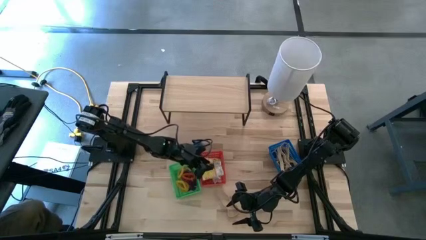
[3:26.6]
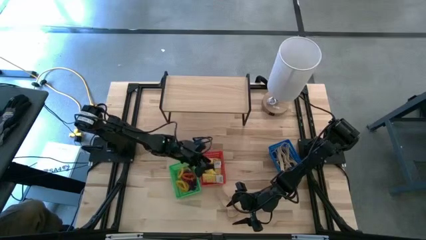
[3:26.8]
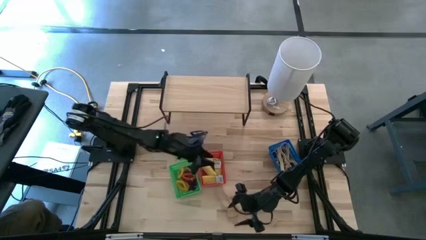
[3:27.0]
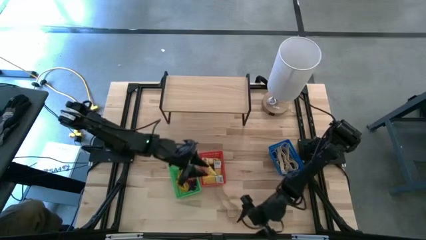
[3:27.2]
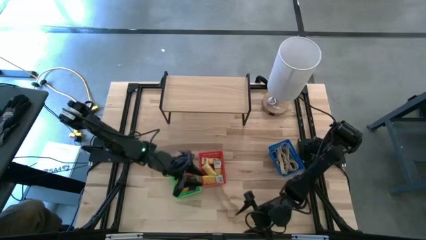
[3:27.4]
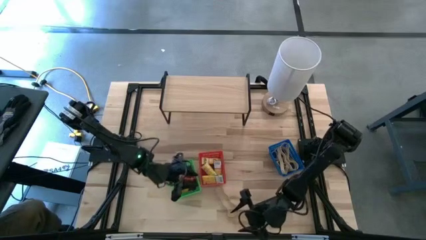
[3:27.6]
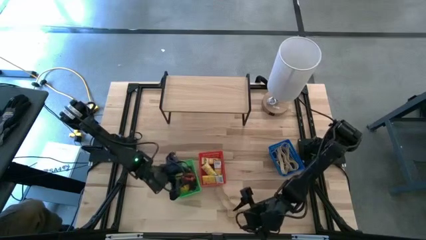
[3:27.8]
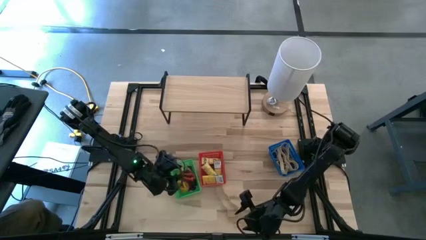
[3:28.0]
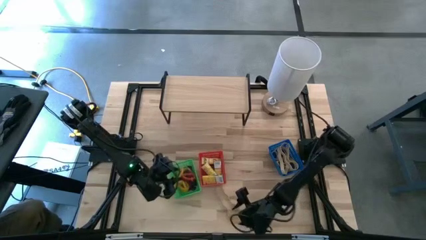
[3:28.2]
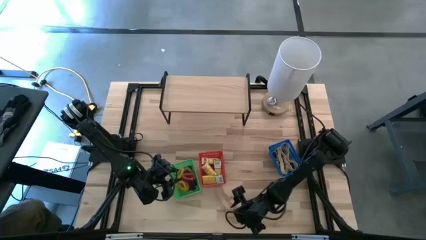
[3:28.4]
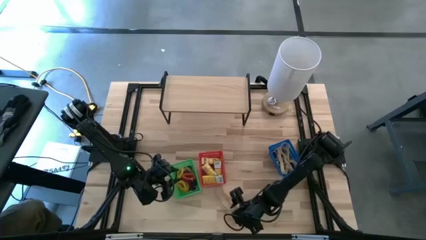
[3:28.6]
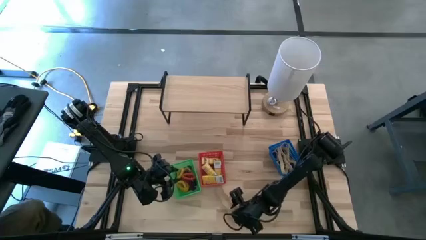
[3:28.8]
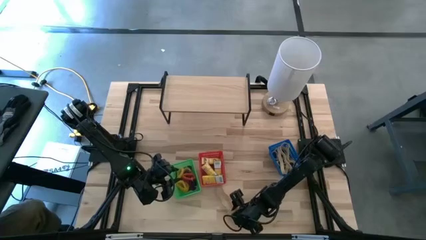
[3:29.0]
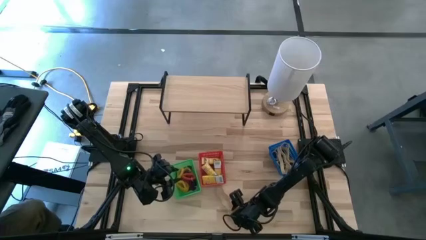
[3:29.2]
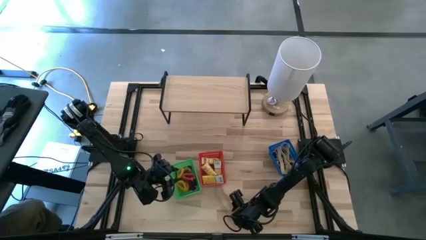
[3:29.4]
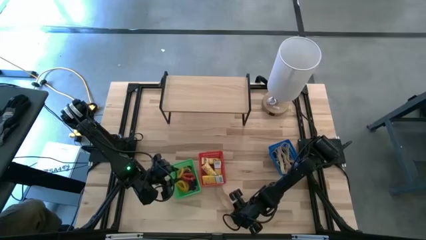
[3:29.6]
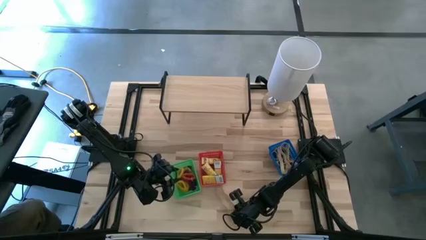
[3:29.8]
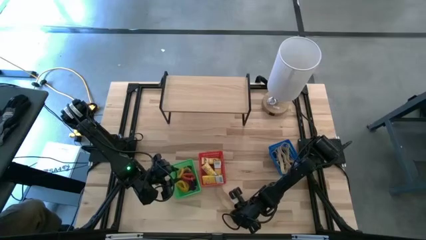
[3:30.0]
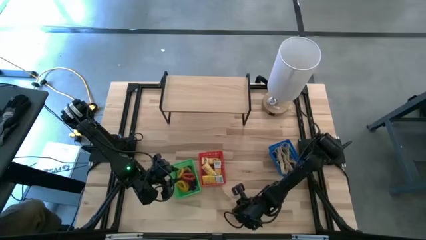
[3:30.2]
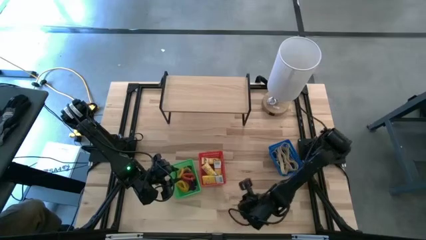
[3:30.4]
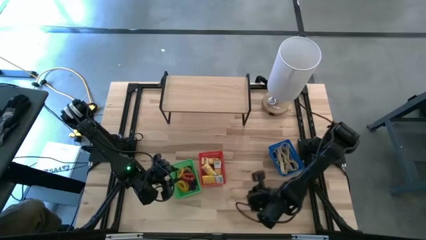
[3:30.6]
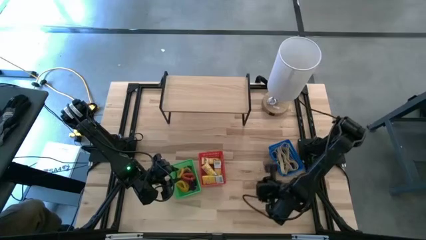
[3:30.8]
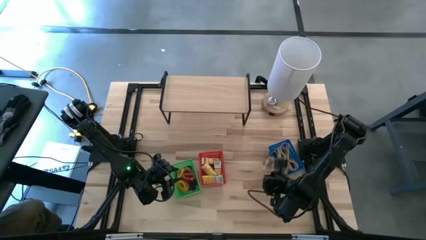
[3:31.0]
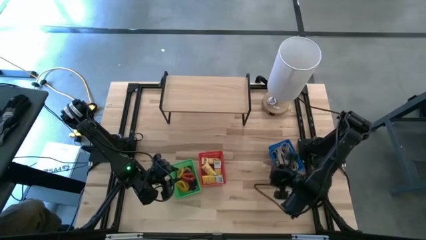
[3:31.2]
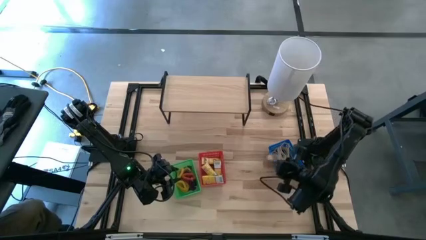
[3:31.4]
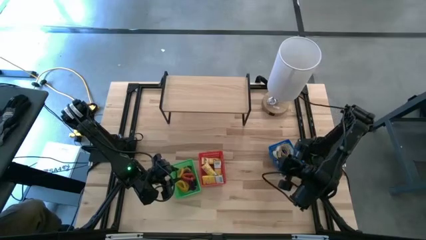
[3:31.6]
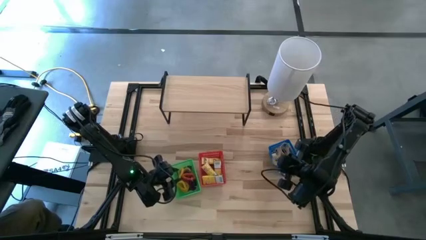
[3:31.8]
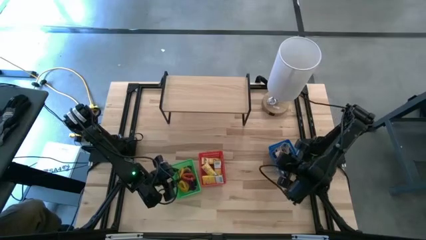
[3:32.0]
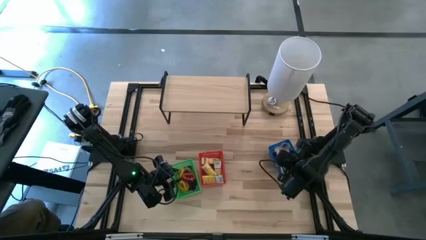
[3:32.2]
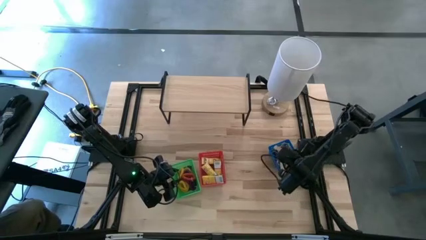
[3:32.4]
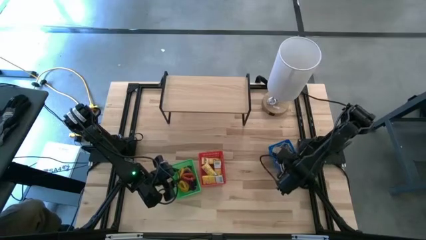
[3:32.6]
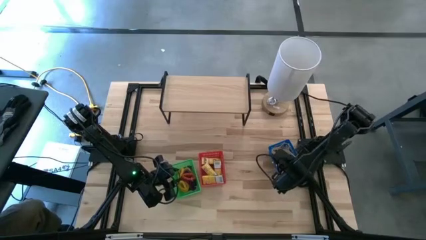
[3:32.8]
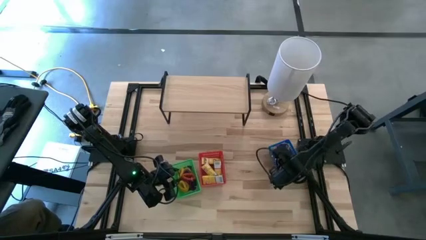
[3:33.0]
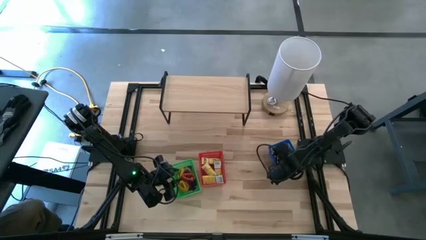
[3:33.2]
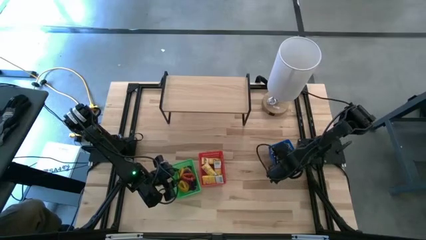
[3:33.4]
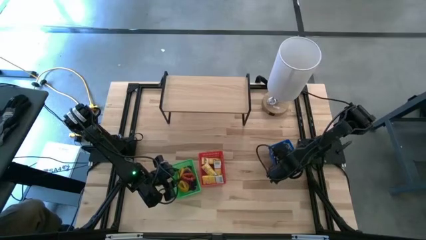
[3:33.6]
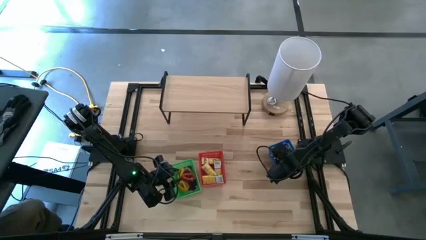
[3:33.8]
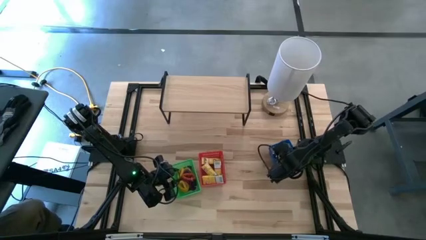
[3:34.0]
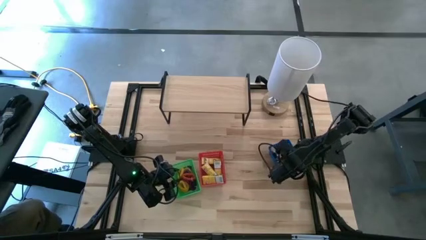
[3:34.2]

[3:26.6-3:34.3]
Task: Pick & Place Office Desk Supplies
Put the white rubber band into the blue bin

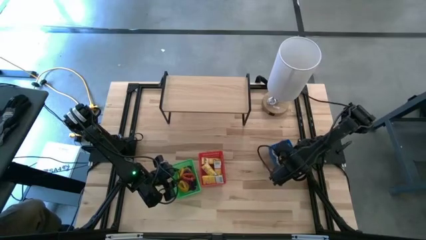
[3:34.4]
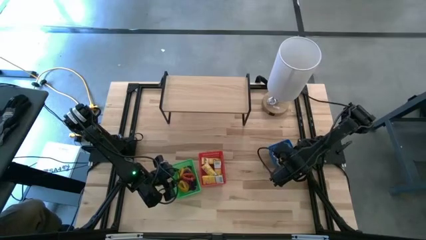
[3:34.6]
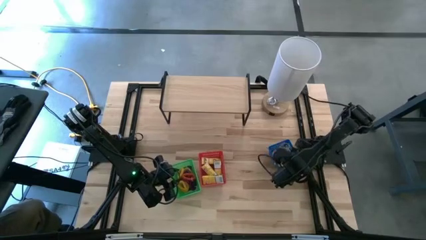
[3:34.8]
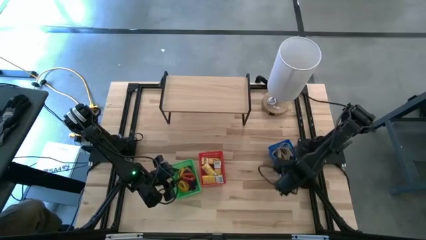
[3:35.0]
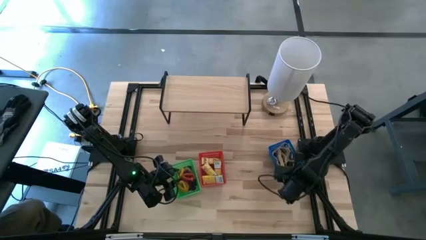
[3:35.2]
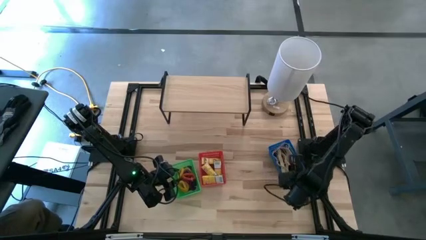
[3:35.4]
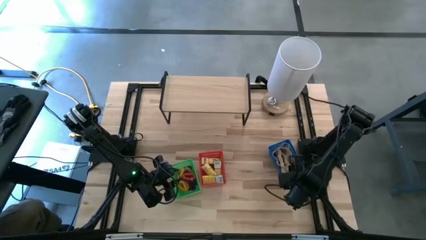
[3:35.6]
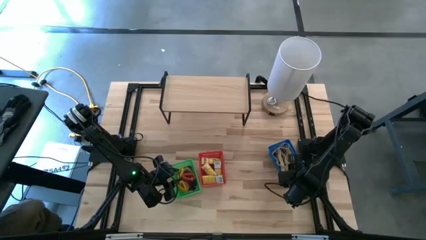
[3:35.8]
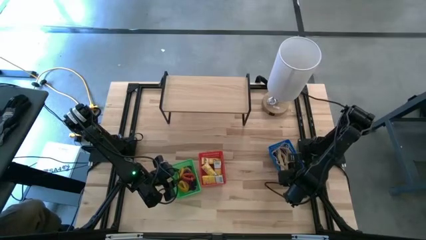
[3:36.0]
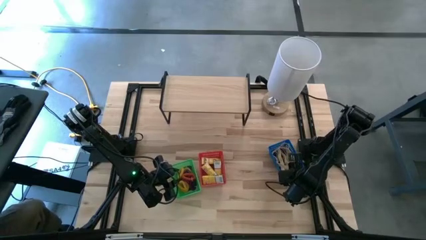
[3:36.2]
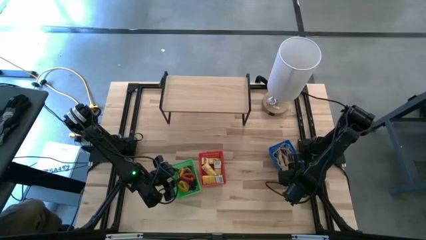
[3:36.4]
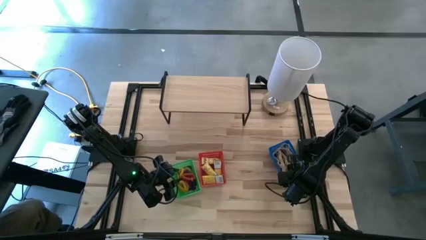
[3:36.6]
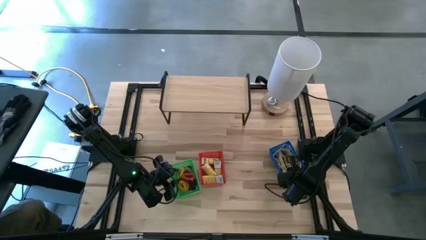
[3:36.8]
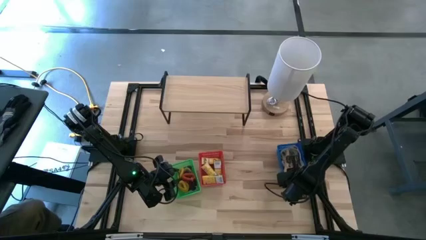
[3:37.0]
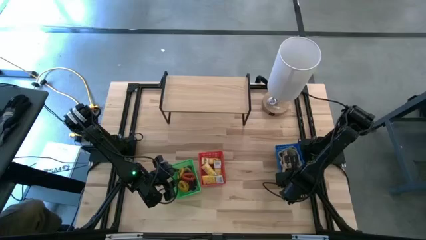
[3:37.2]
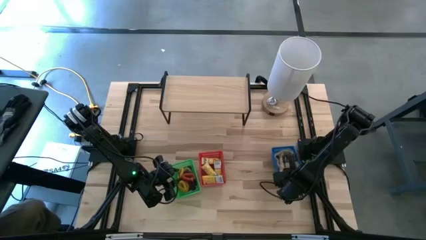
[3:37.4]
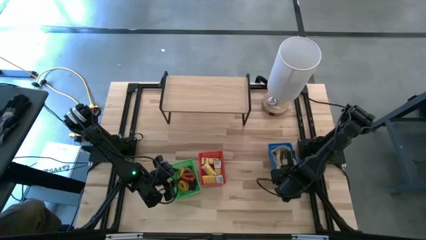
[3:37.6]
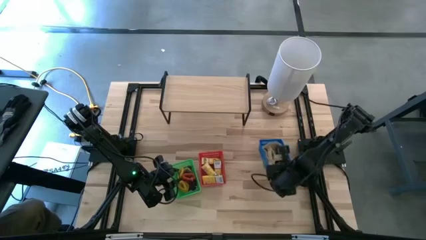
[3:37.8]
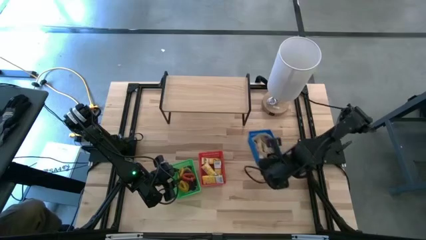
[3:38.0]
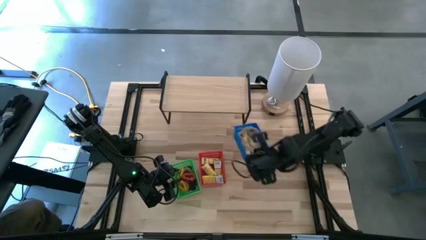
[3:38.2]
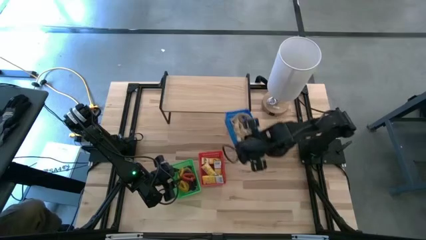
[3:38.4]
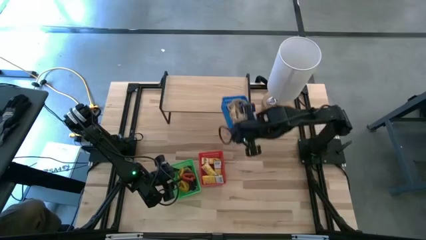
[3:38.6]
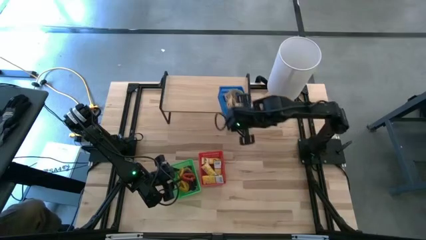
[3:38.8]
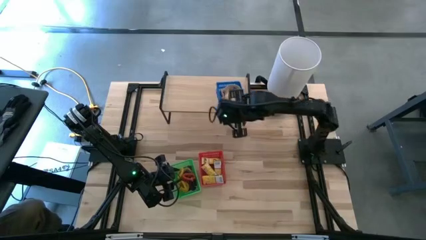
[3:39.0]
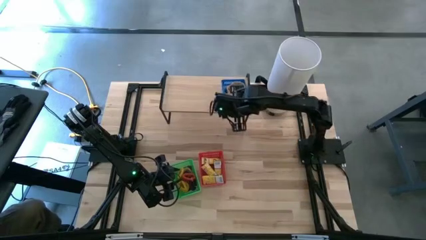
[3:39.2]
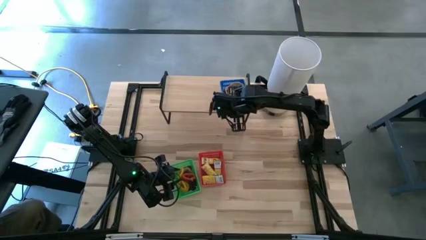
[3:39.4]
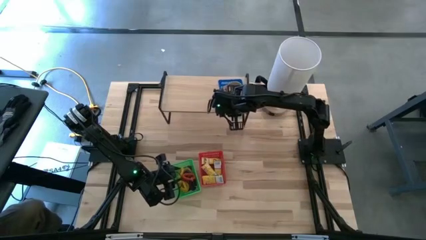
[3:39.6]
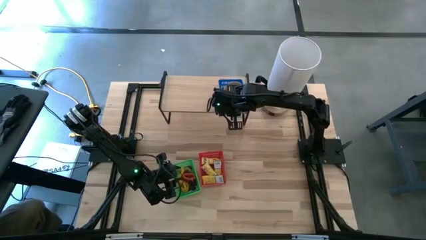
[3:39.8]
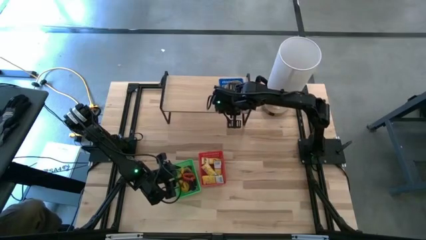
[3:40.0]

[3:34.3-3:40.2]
Put the blue bin on the shelf

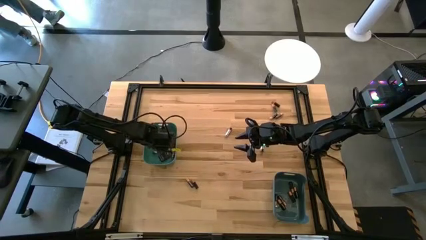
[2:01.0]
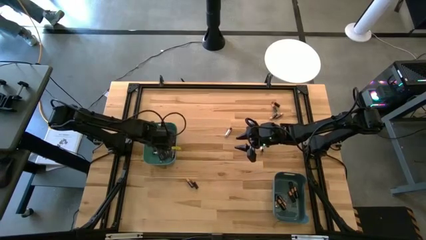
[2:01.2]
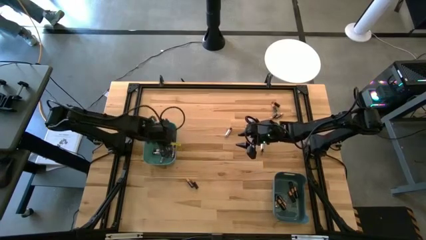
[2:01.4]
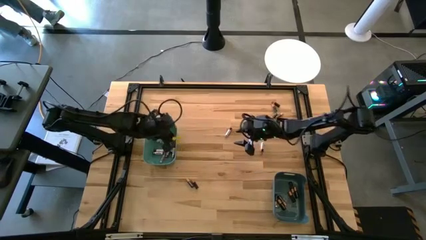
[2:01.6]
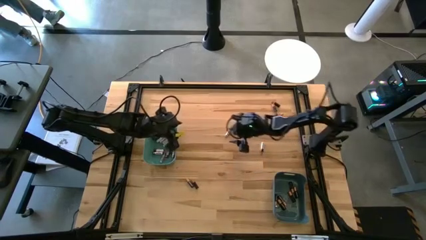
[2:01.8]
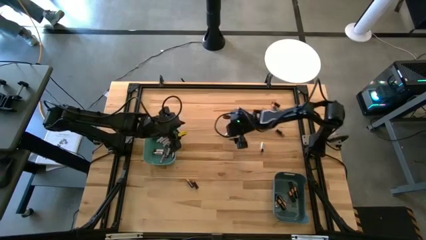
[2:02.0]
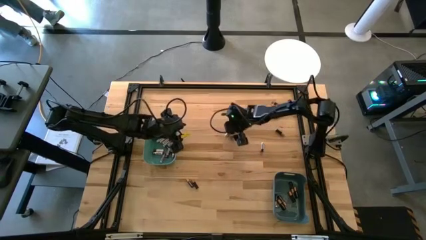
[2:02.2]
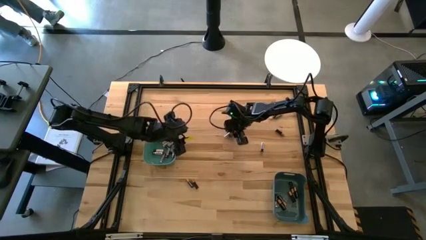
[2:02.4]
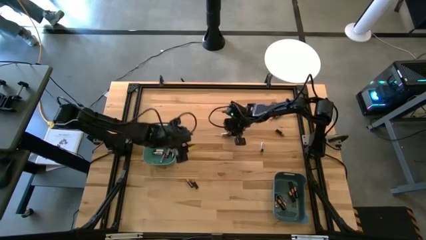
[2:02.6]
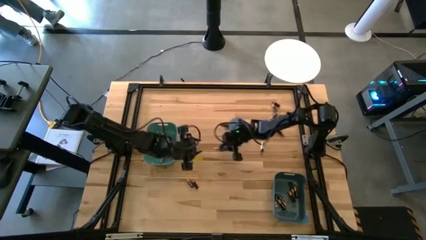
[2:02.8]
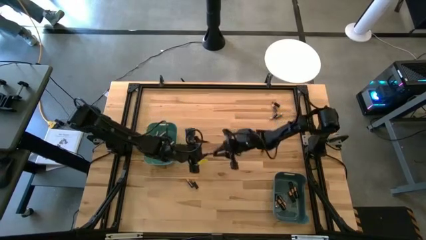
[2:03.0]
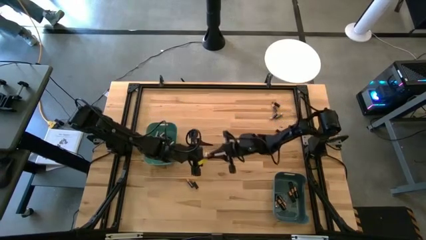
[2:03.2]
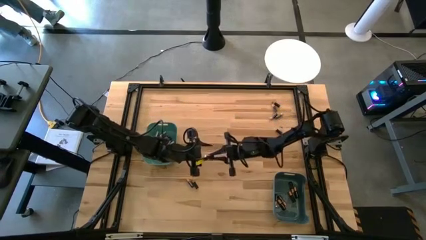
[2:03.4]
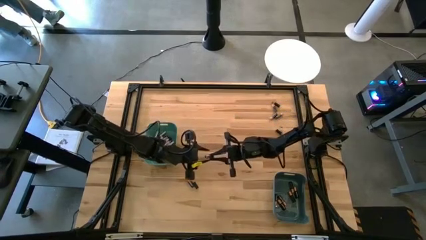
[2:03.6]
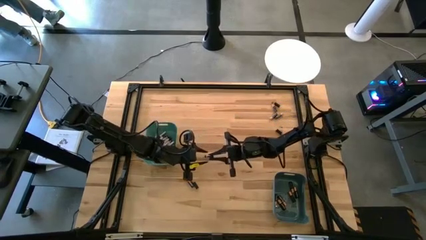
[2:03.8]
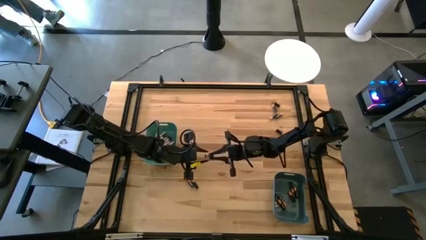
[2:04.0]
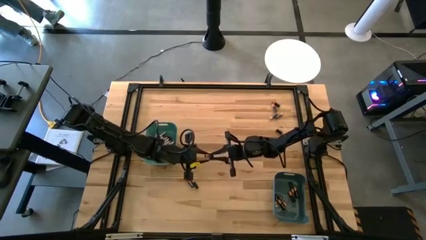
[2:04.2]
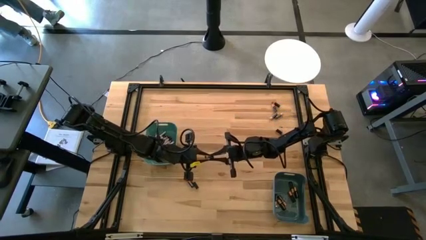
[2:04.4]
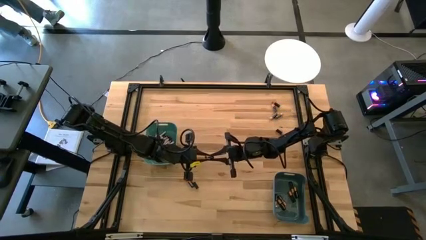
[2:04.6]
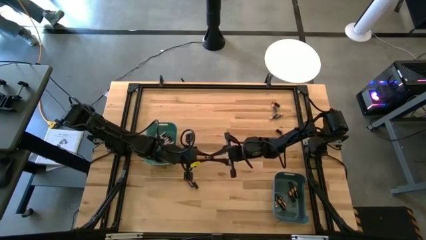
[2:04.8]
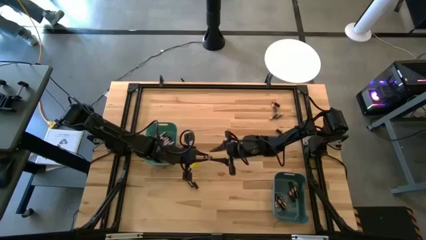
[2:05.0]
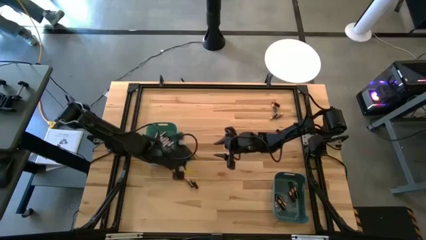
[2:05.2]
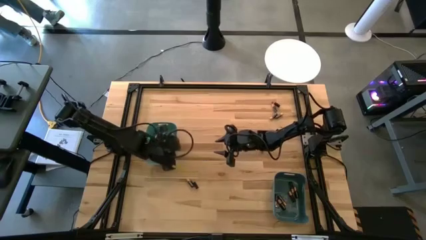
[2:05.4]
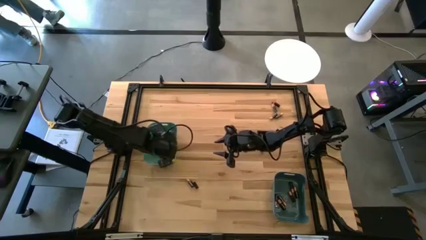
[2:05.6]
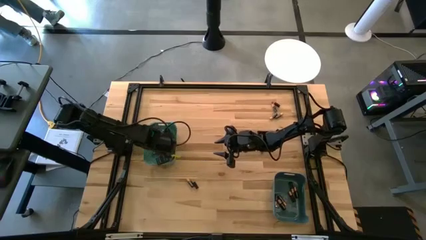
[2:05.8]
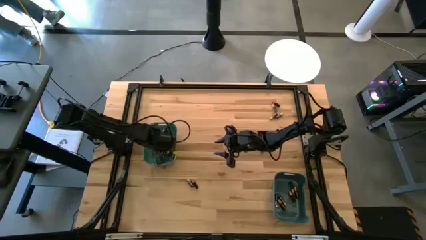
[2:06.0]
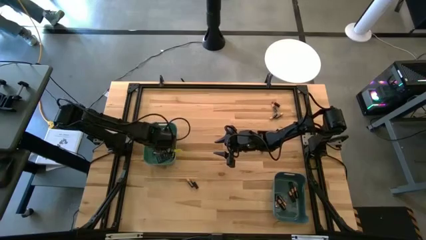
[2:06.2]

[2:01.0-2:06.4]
Task: Sort batteries
Put the silver battery into the green bin
